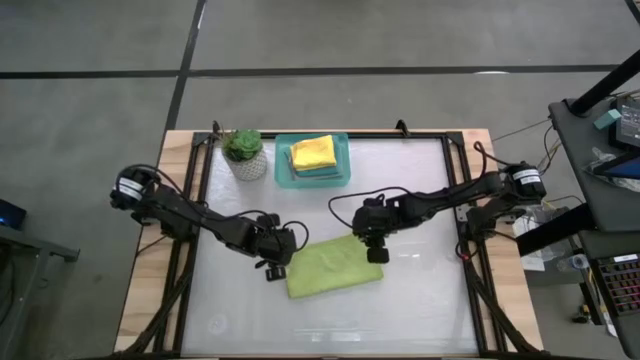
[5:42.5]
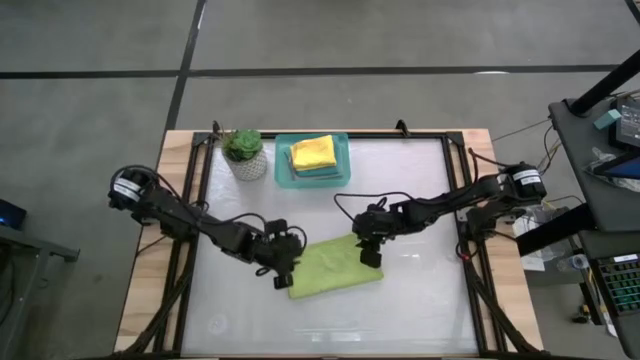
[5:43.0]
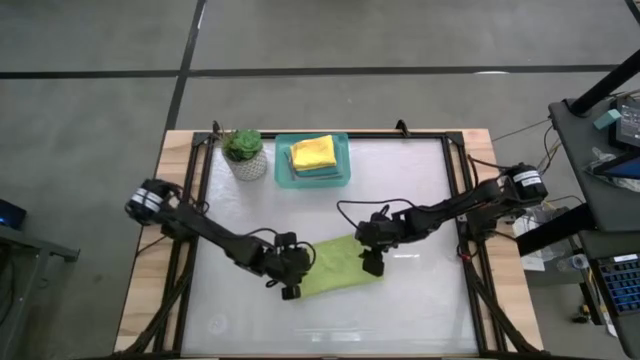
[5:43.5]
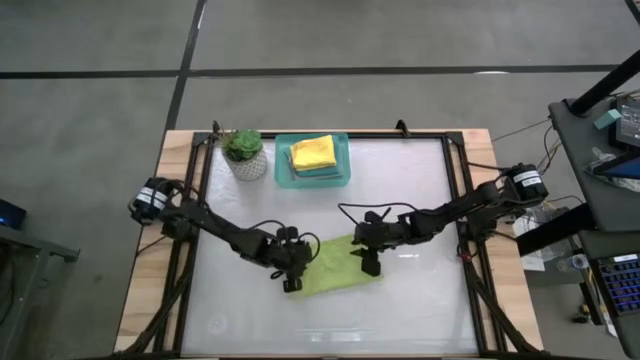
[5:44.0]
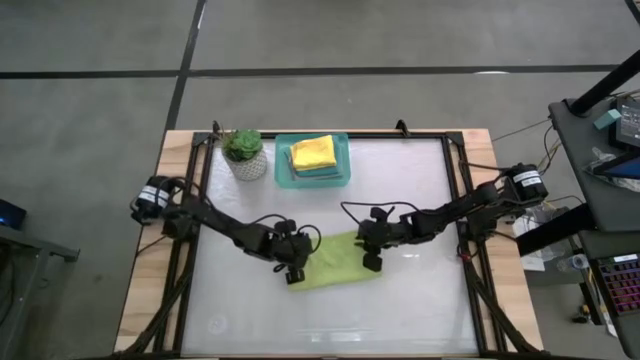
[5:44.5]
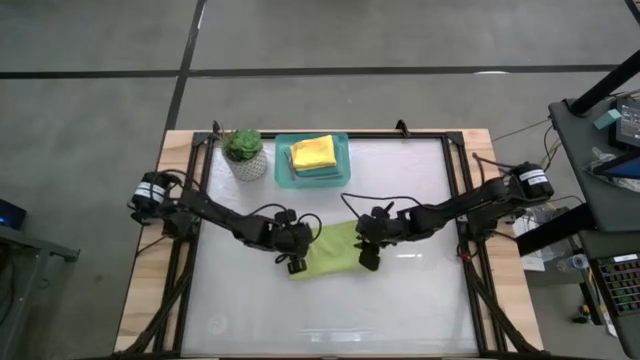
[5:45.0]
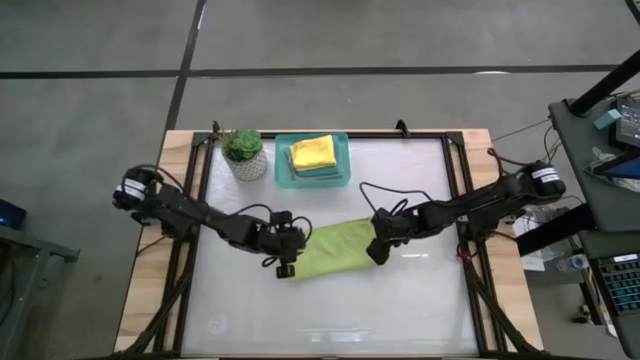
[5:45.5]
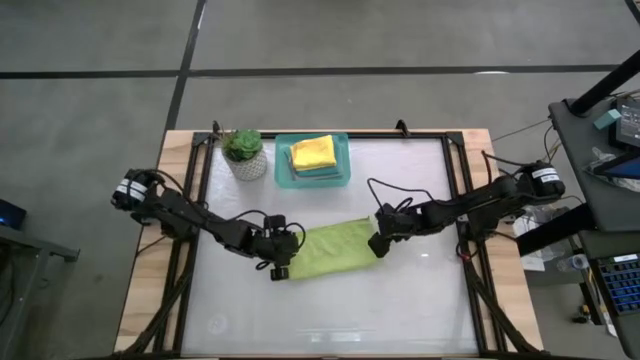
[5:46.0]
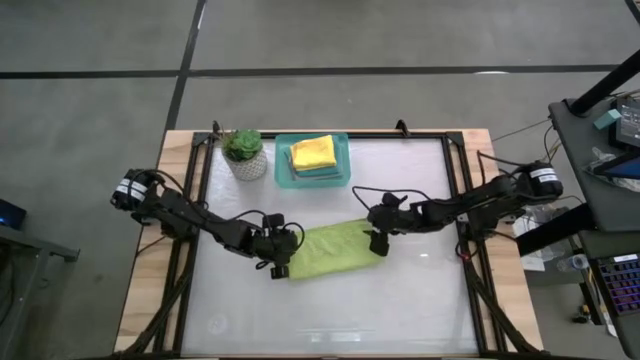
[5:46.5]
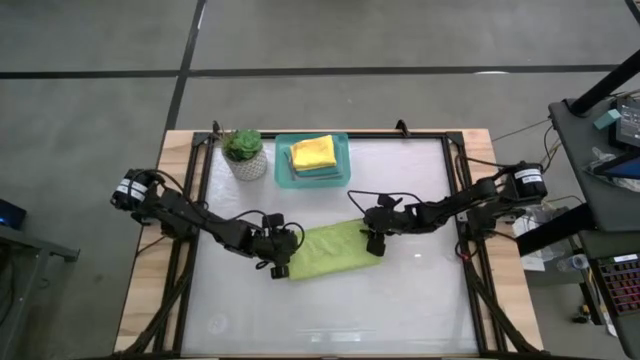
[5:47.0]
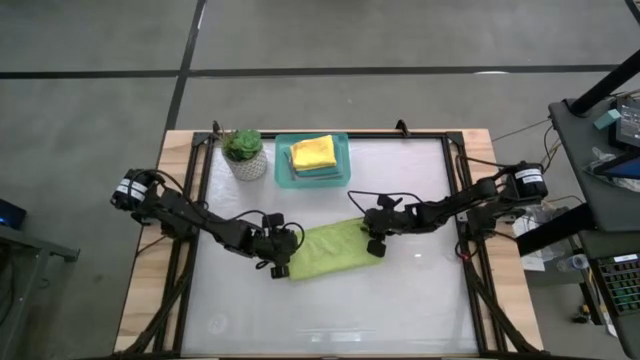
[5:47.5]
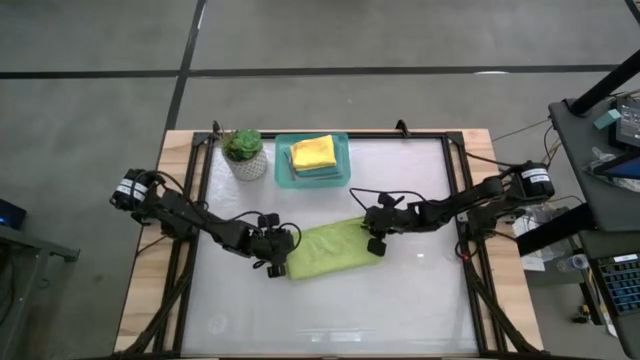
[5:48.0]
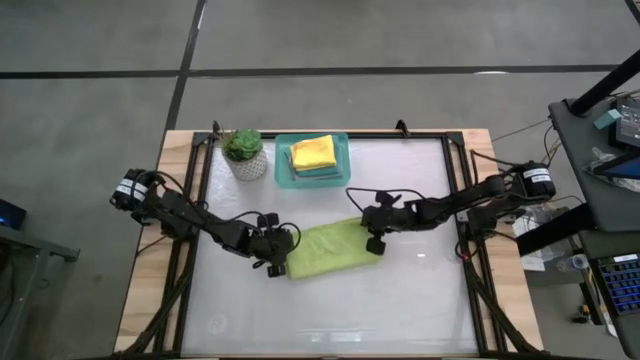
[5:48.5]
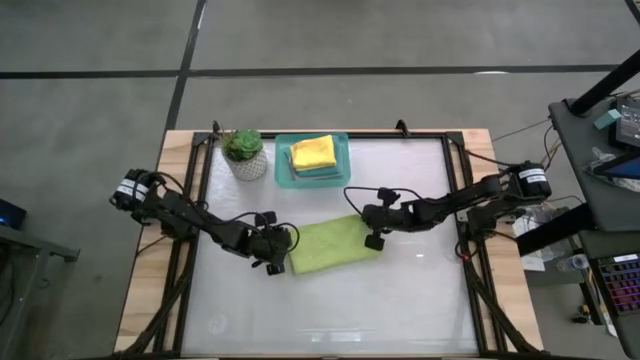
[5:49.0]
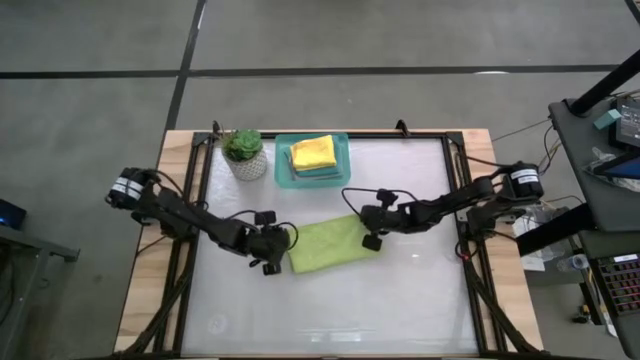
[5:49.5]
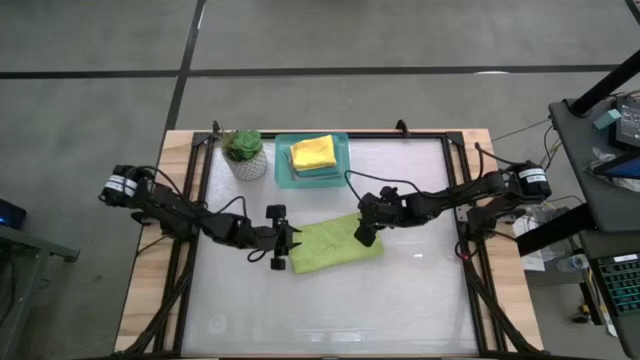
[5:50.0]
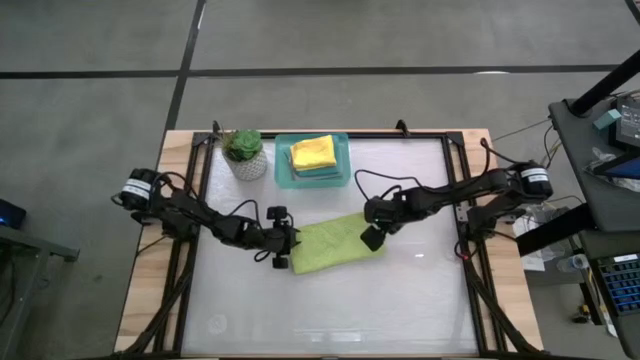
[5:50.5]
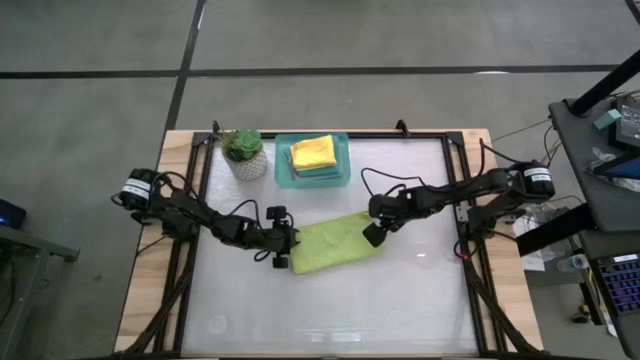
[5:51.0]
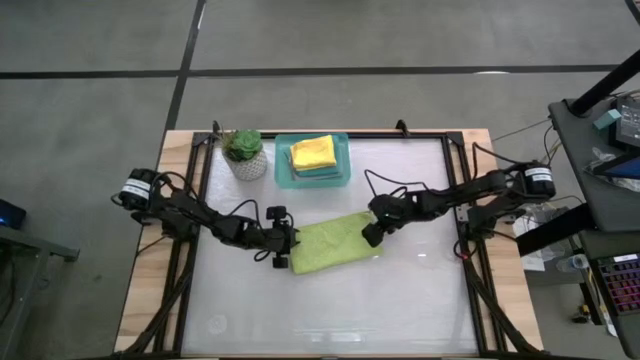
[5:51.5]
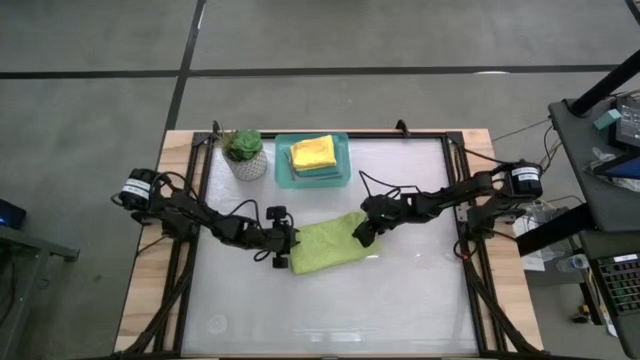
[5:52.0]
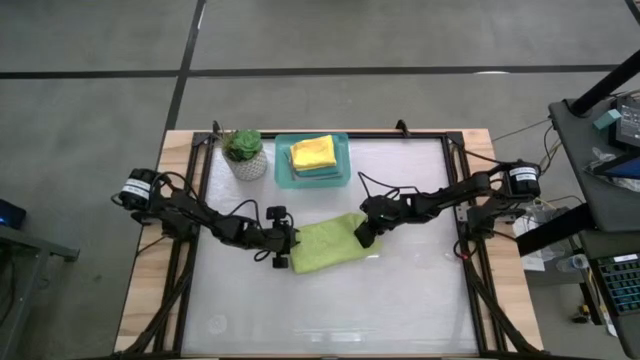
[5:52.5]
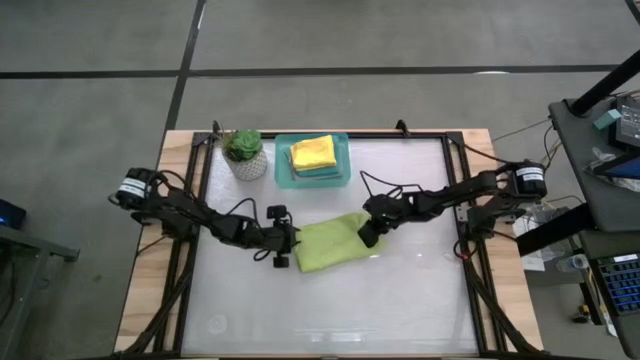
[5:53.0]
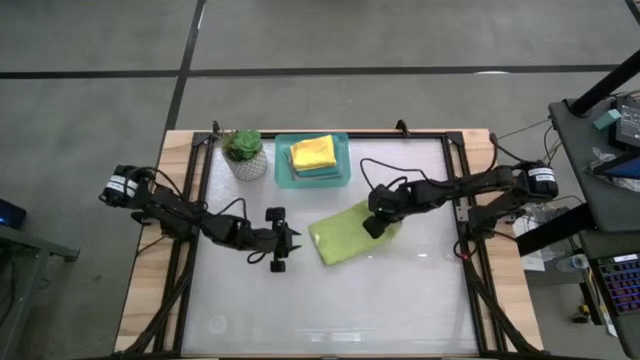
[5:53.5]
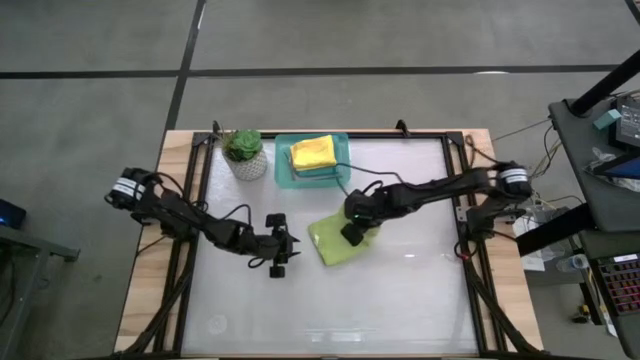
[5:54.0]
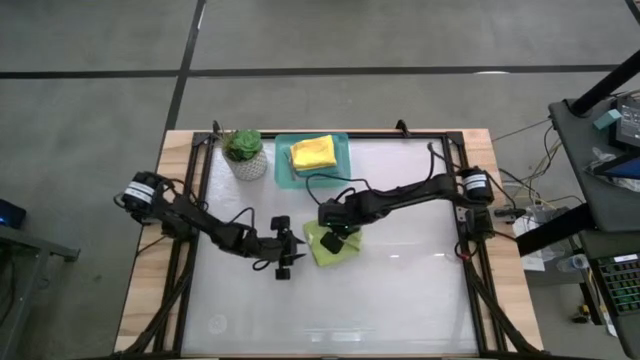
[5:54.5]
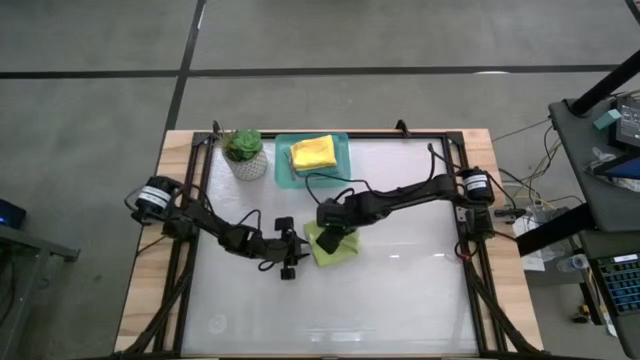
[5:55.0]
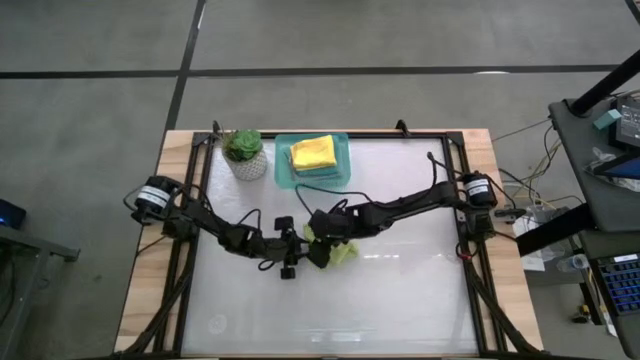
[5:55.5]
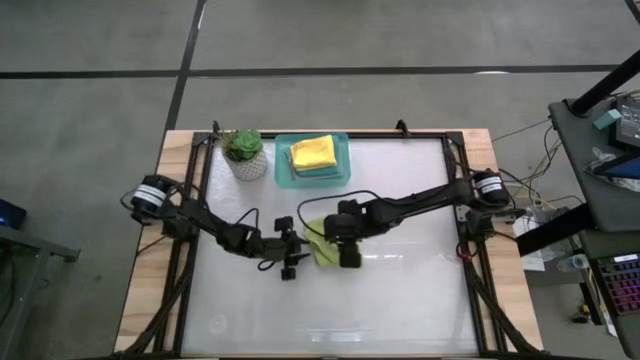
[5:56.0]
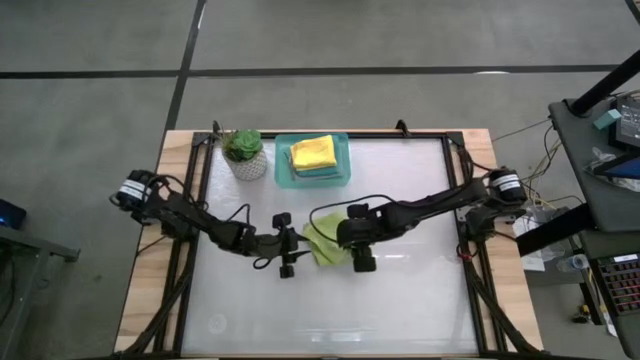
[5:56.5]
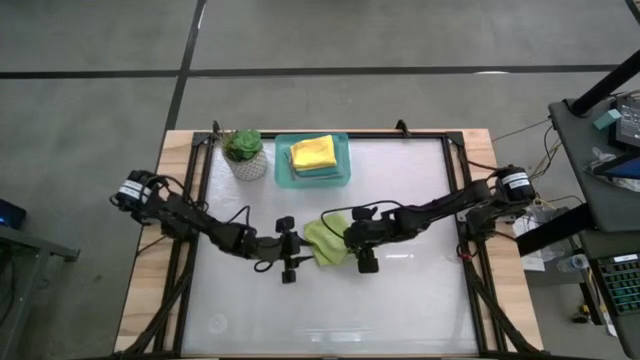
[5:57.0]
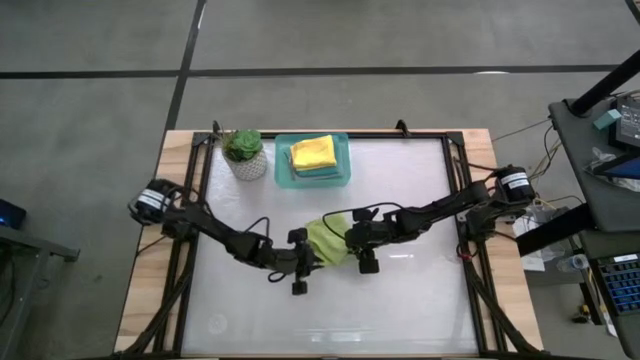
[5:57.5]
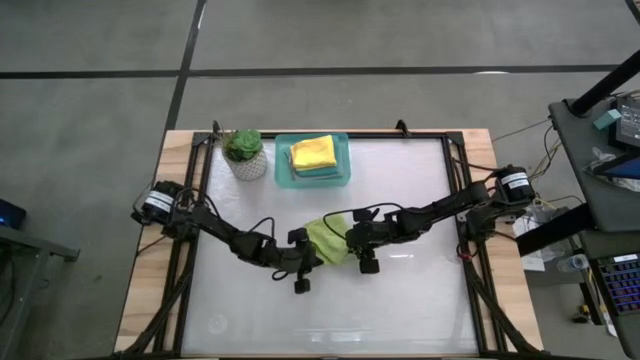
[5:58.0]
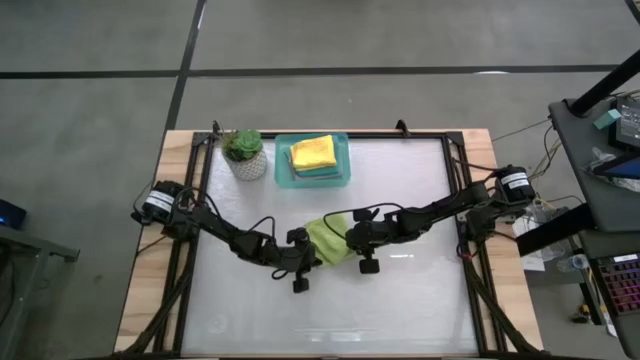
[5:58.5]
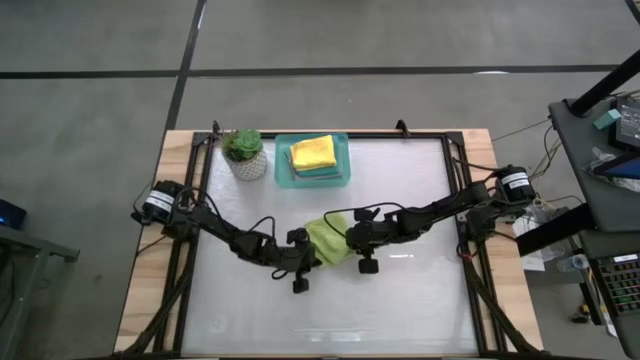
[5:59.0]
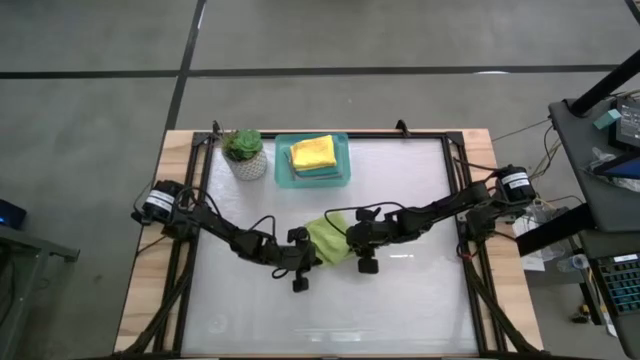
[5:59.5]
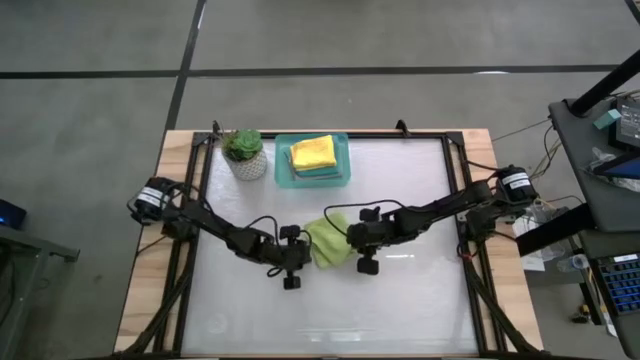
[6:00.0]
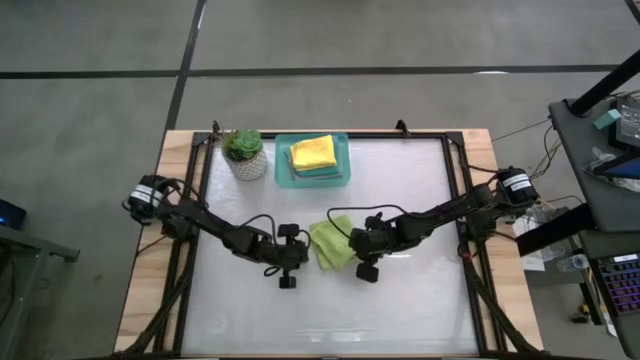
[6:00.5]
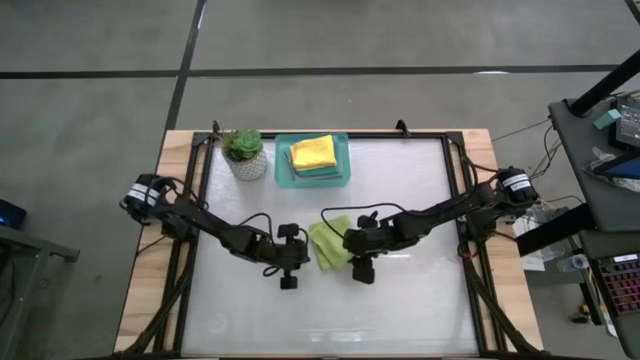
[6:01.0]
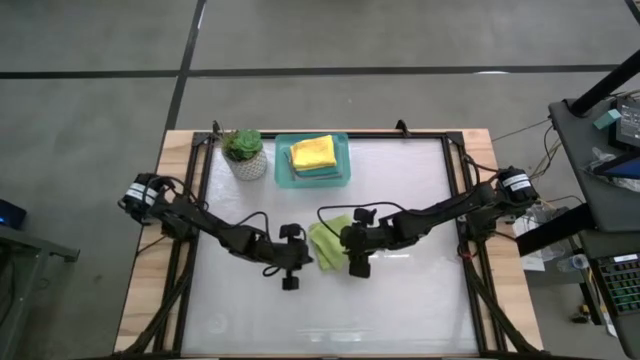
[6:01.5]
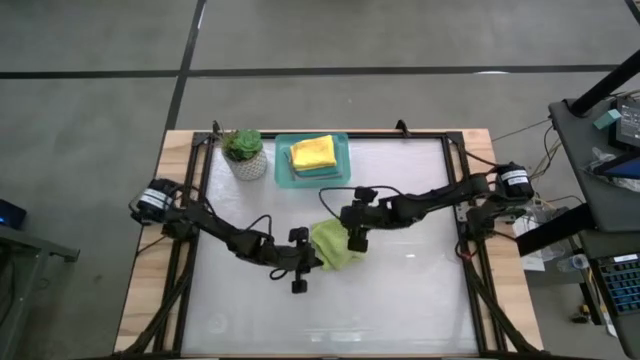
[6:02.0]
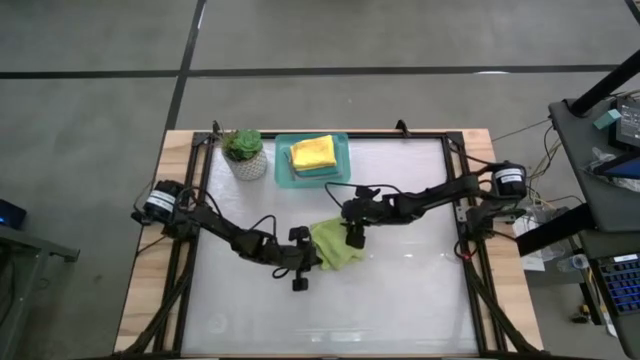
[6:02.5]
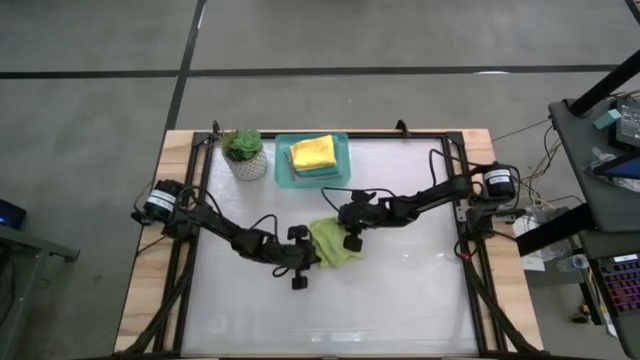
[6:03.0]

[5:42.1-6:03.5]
Task: Fold microfiber towels
Fold the green microfiber cloth
